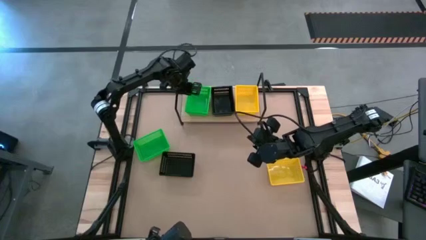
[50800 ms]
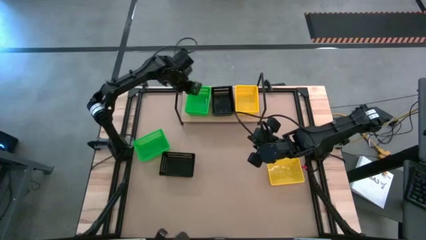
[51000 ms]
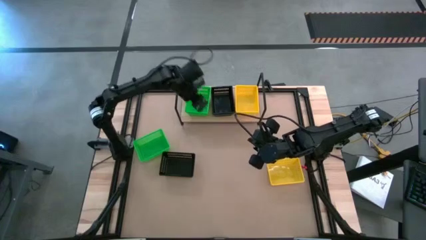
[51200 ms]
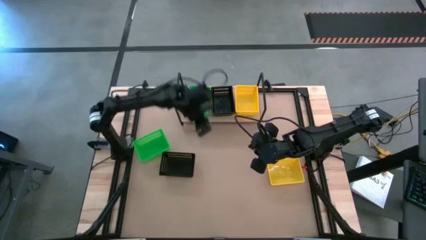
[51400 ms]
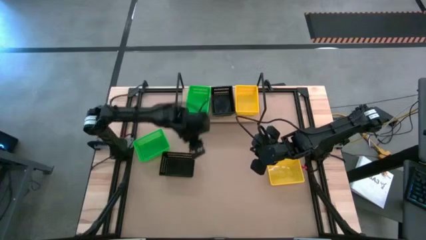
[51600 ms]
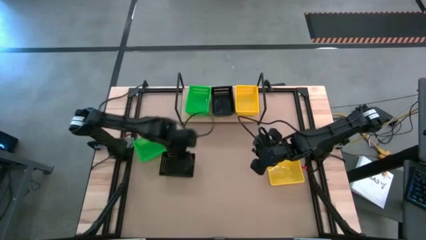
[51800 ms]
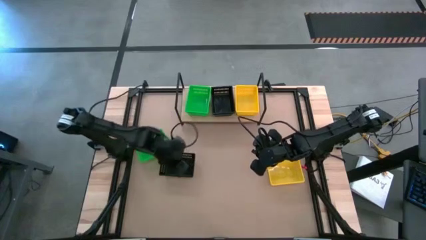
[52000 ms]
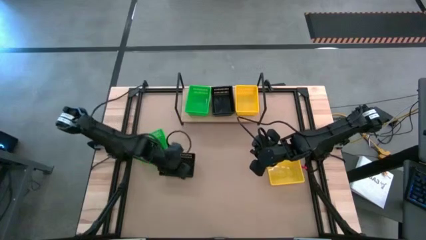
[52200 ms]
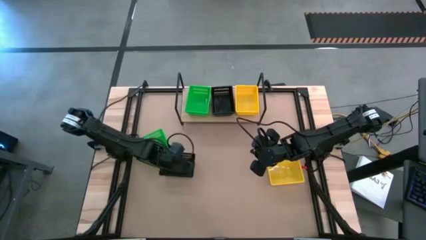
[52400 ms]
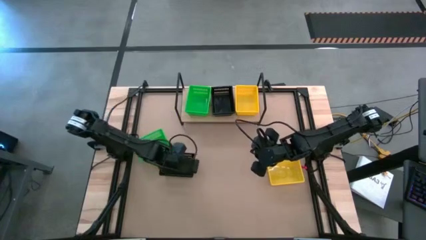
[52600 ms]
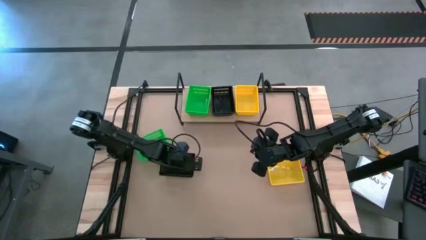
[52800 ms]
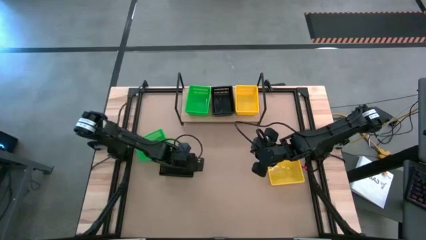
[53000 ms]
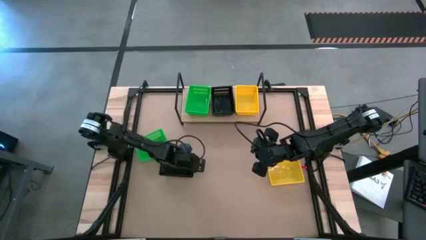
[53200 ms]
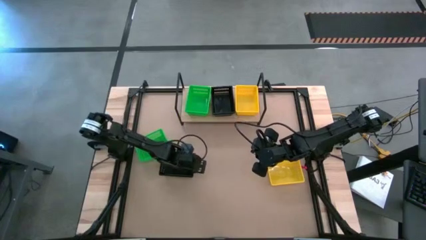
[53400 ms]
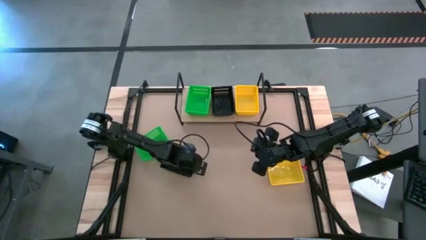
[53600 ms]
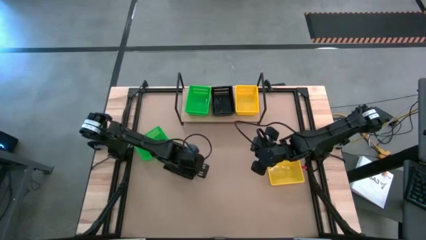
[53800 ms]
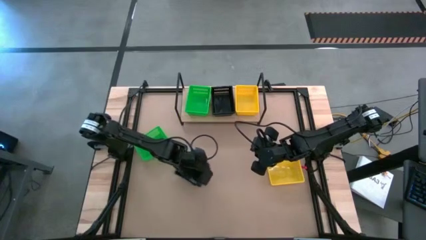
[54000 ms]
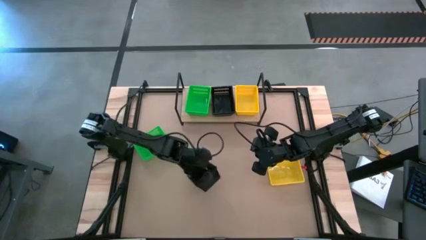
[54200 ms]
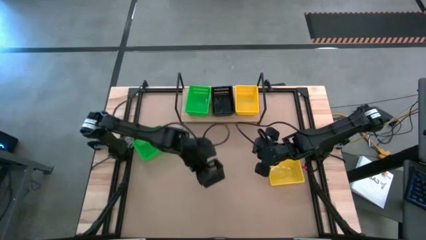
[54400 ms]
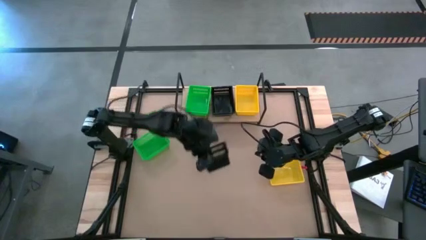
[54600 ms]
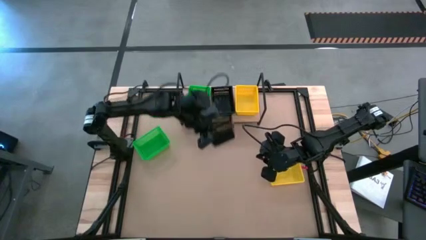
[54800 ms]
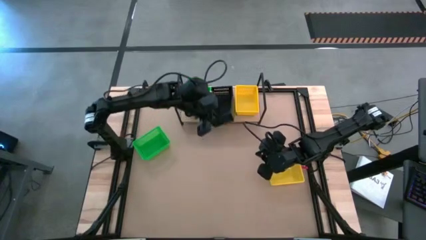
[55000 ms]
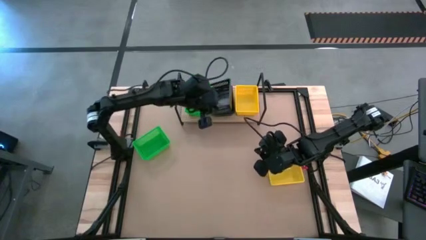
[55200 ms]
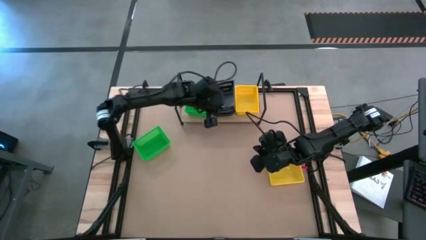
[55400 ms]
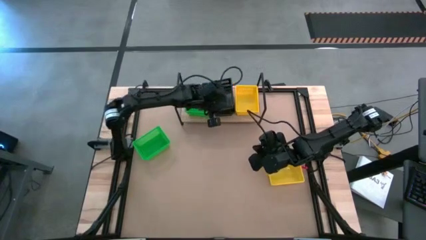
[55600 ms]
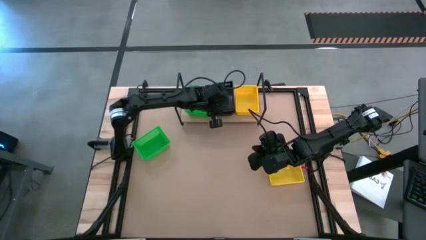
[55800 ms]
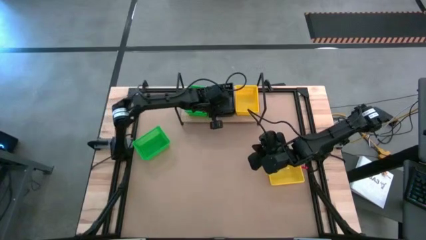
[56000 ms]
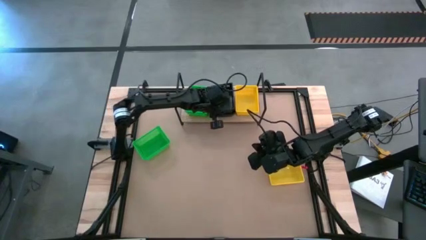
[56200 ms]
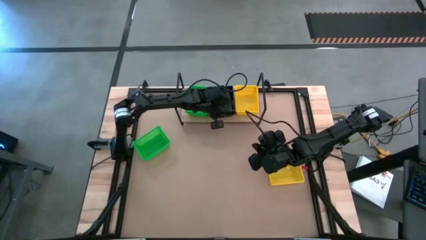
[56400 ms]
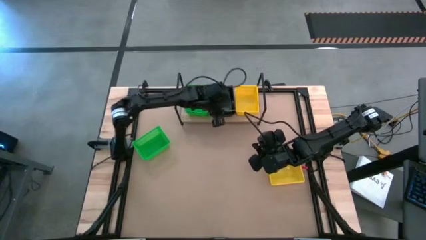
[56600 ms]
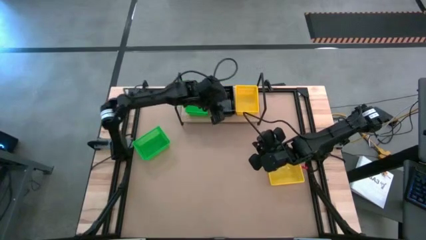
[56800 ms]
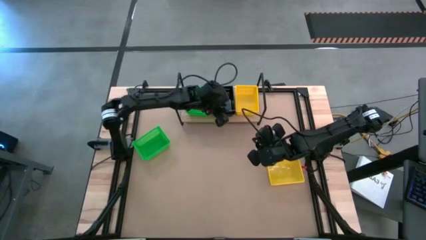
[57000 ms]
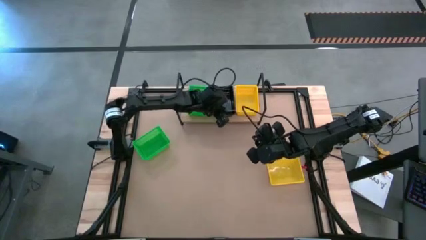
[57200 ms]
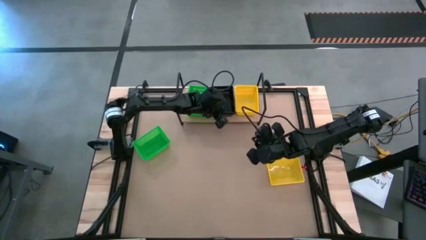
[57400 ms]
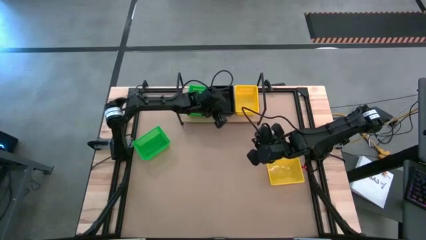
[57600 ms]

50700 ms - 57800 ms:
Task: Stack baskets on shelf by color
Stack the black basket on top of the stacked black baskets on the shelf

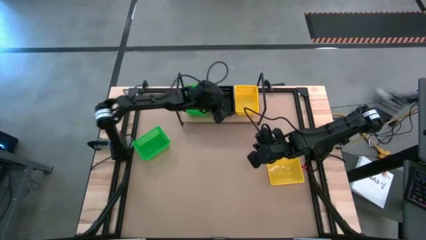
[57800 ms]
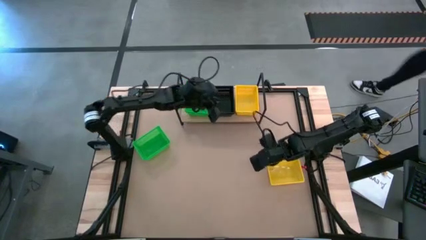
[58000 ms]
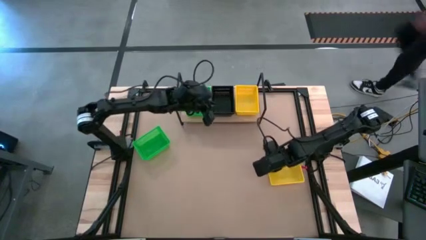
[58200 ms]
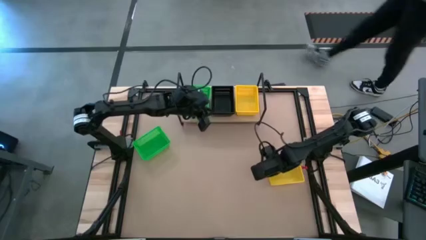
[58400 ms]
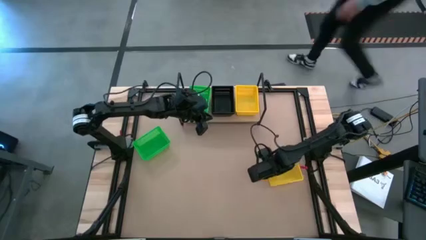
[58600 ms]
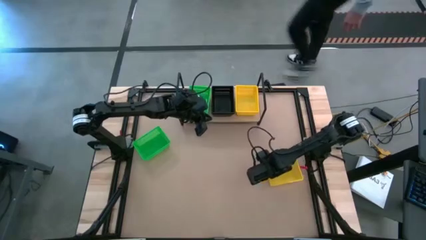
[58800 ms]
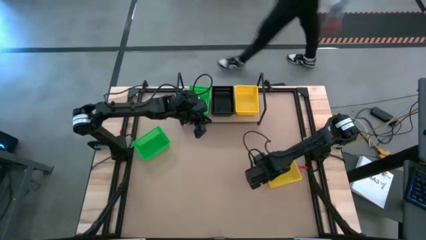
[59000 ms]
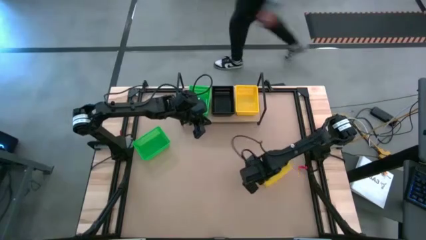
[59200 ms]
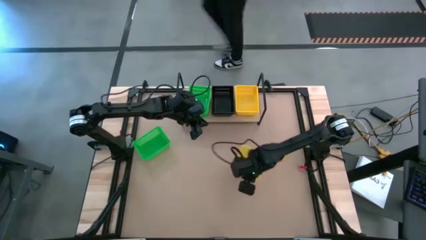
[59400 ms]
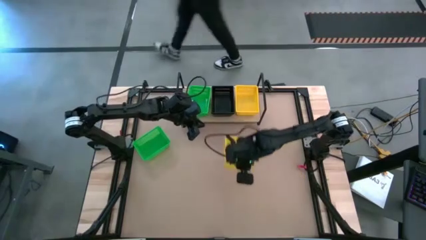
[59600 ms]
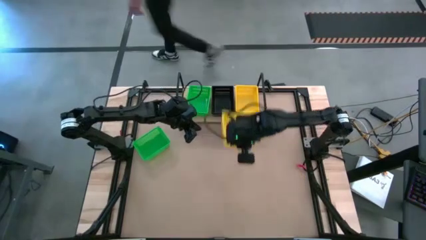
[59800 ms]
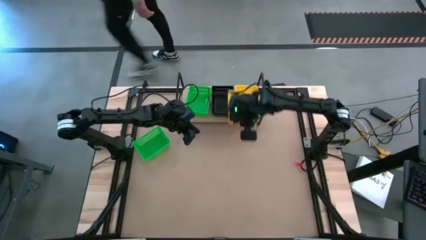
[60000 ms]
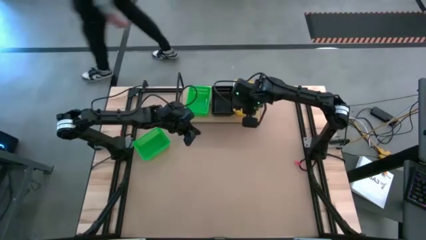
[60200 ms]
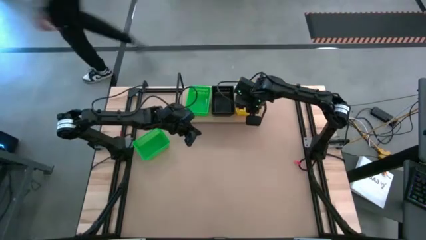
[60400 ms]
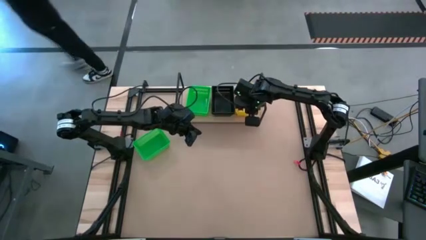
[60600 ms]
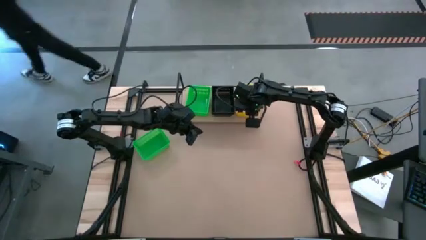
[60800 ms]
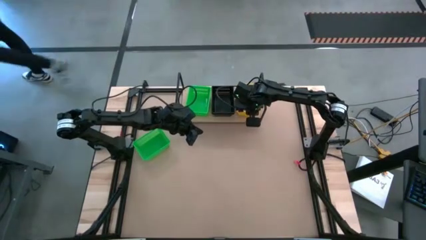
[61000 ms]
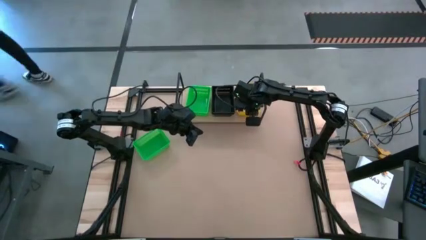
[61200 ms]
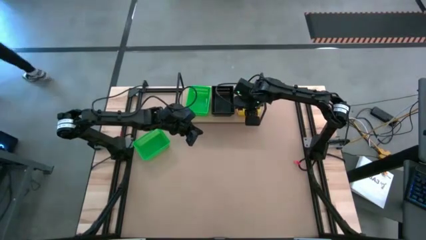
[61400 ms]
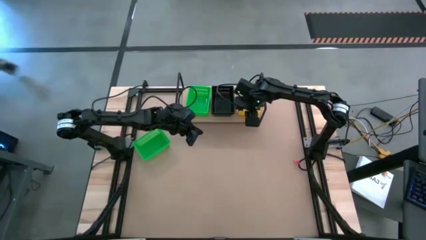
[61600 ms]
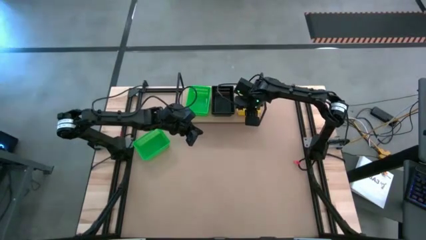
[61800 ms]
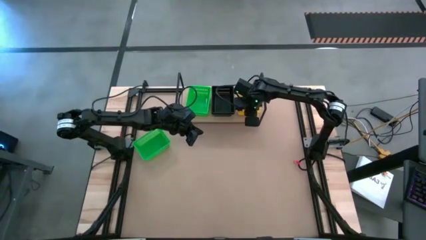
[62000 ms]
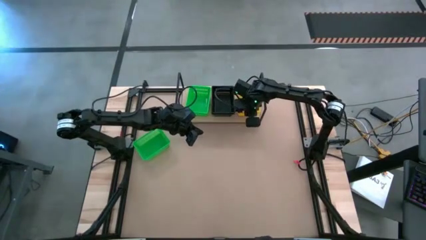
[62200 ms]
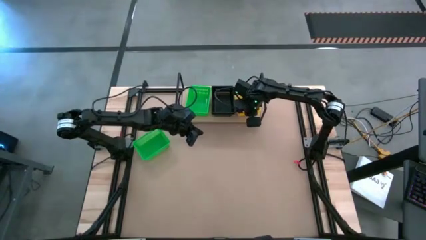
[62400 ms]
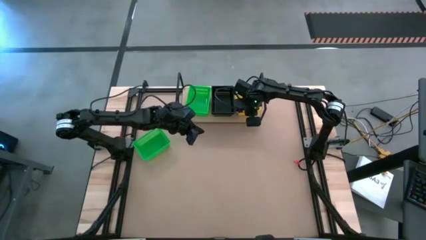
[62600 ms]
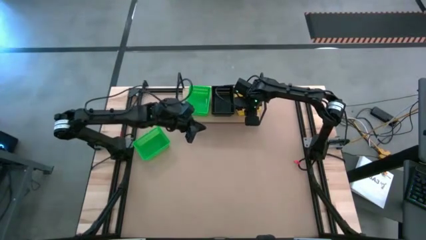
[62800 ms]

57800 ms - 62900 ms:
Stack the yellow basket on top of the stacked yellow baskets on the shelf

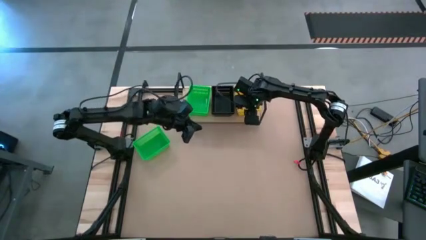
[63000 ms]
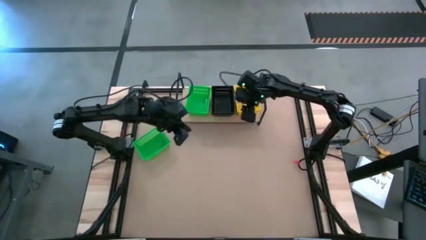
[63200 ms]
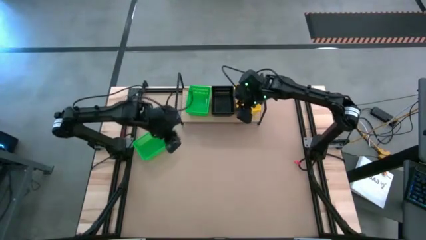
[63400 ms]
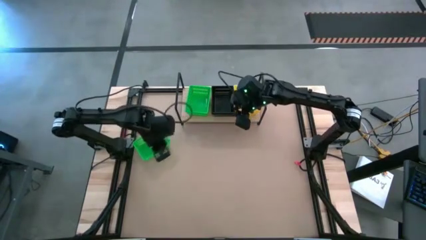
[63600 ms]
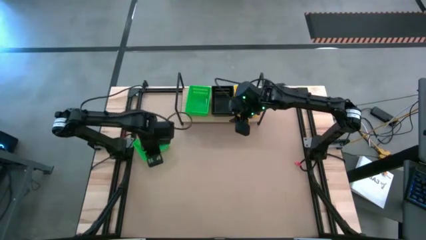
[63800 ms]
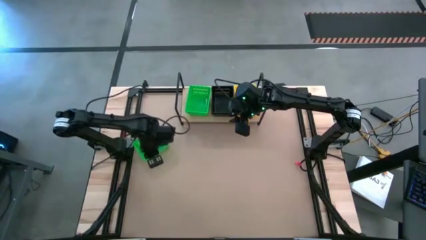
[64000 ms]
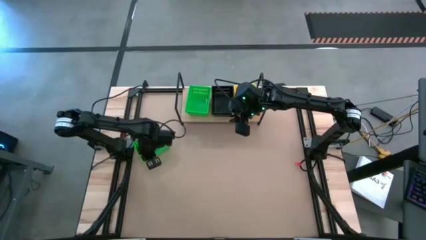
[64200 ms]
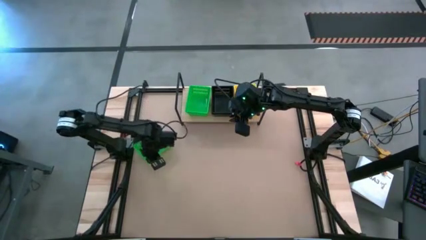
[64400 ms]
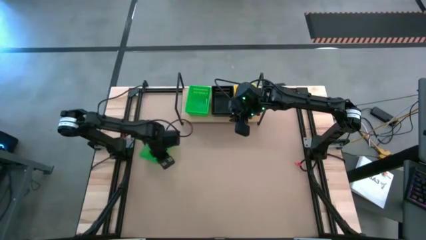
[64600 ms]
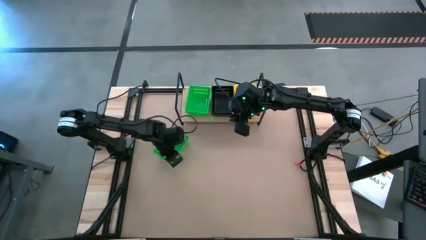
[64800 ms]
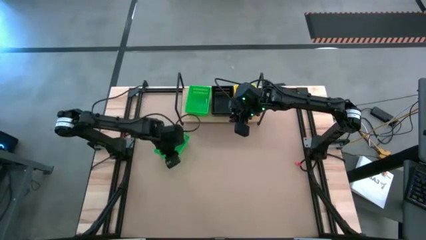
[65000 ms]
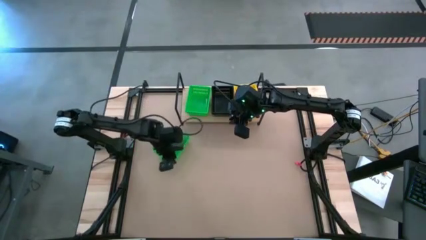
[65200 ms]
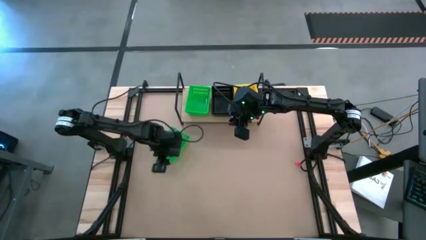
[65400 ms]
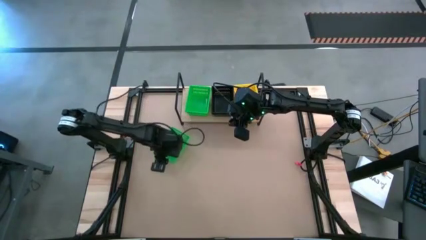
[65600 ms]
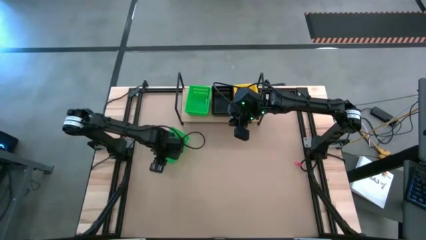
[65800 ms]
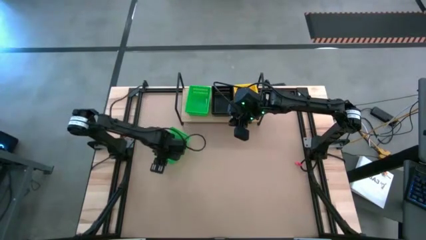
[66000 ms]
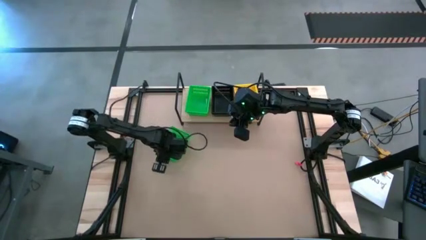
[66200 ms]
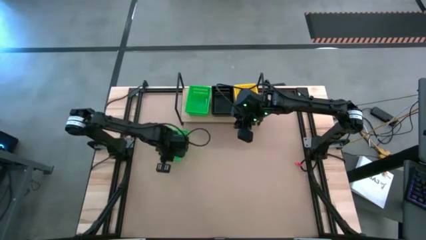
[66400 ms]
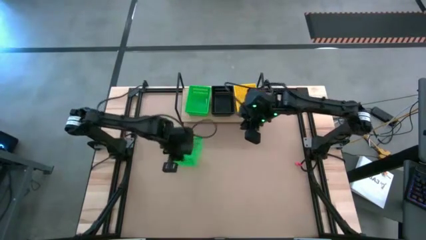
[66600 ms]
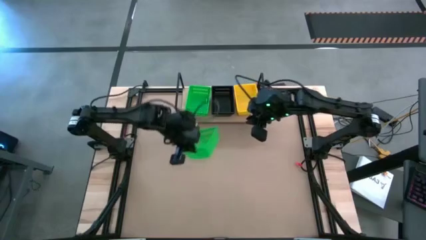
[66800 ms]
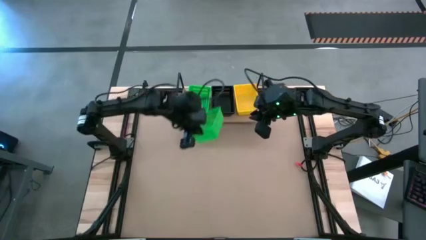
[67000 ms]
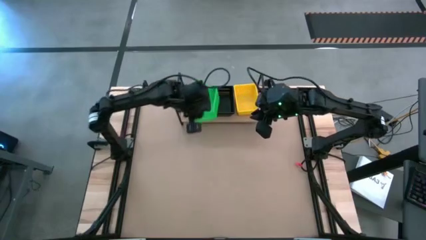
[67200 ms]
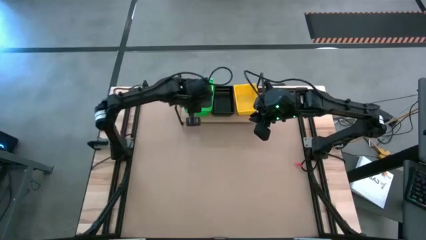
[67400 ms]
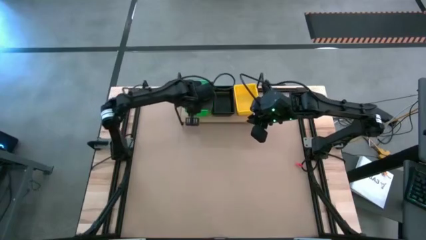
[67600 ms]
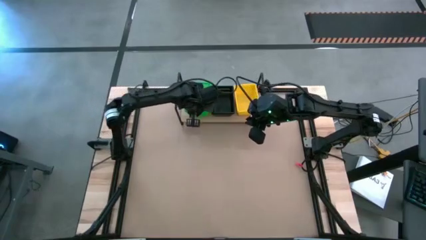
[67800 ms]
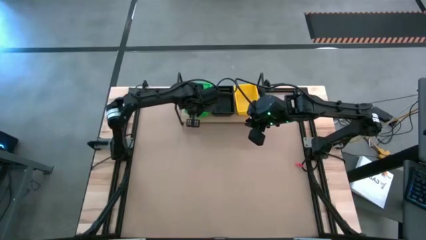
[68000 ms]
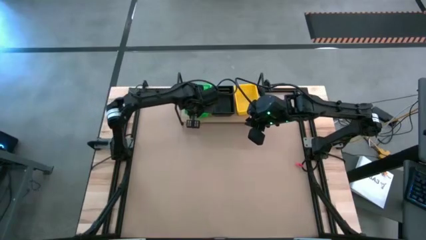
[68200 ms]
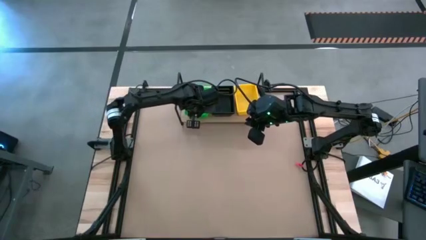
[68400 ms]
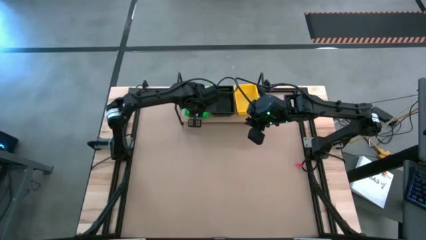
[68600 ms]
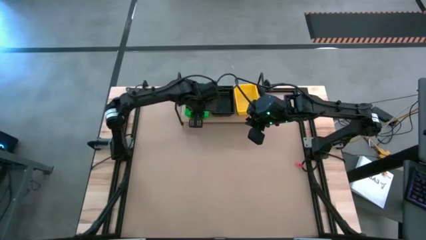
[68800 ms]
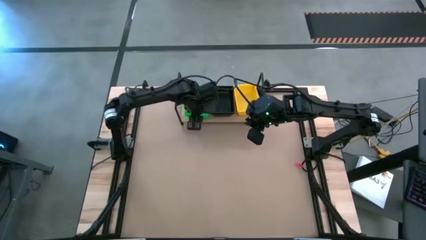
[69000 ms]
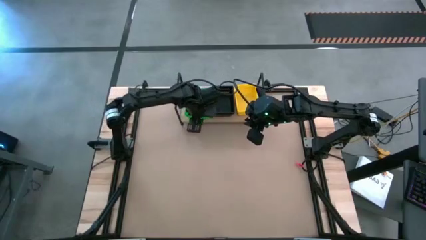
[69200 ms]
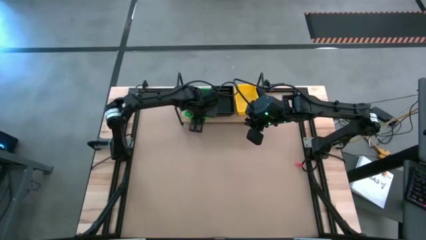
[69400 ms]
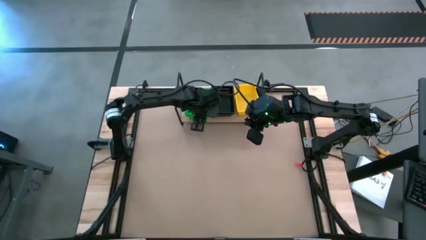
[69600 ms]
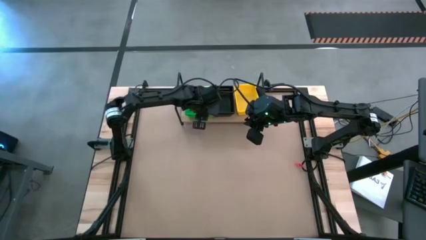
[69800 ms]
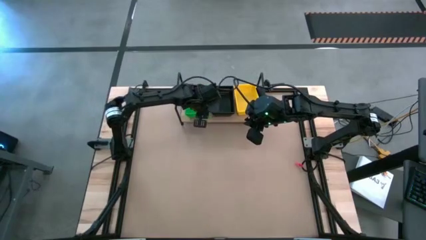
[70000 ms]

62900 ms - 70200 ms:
Stack the green basket on top of the stacked green baskets on the shelf
